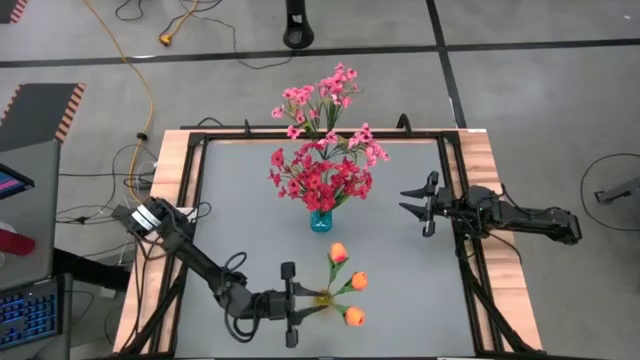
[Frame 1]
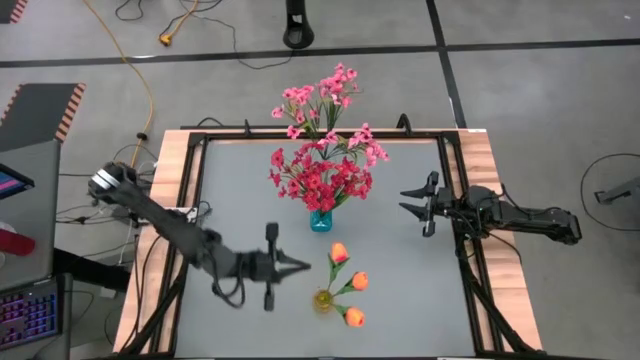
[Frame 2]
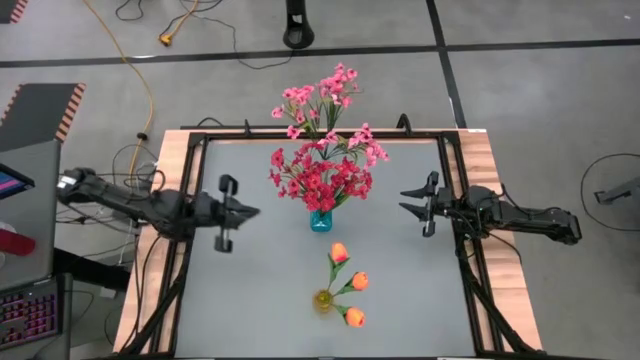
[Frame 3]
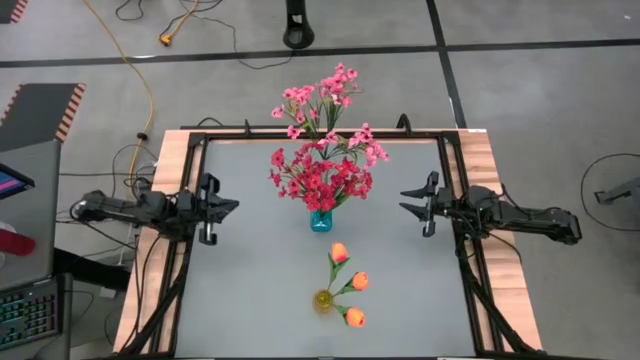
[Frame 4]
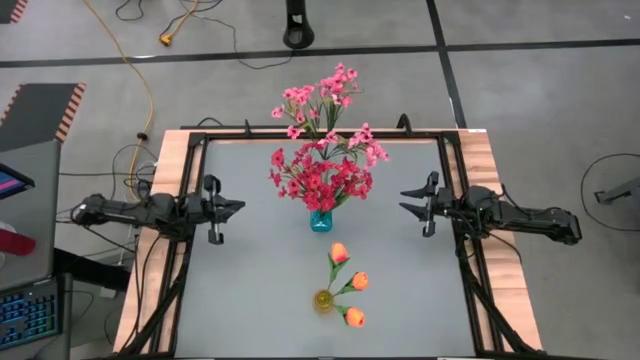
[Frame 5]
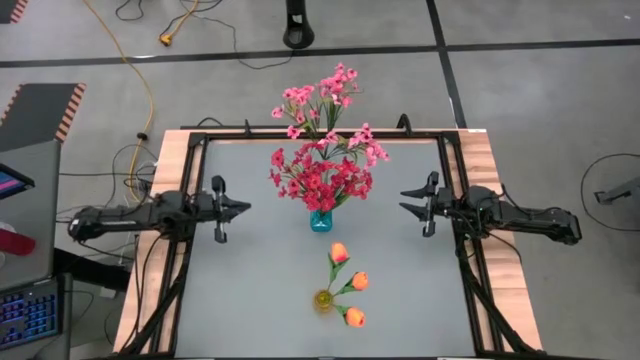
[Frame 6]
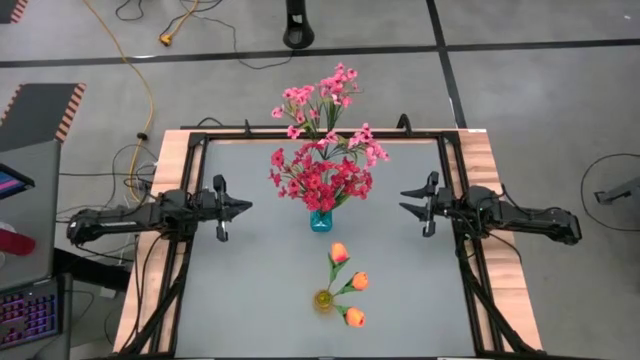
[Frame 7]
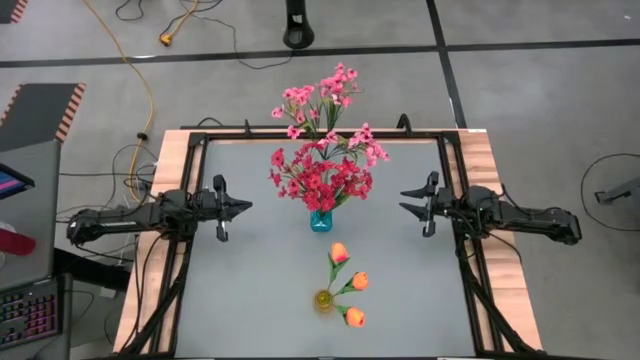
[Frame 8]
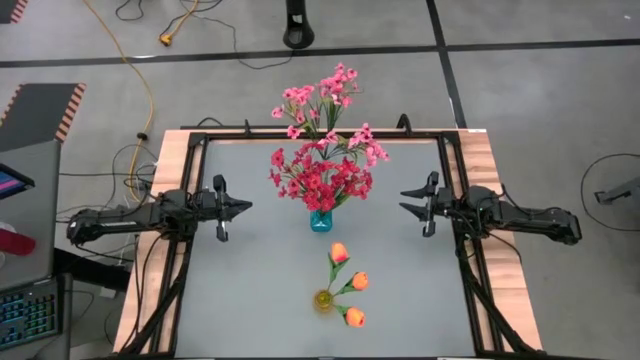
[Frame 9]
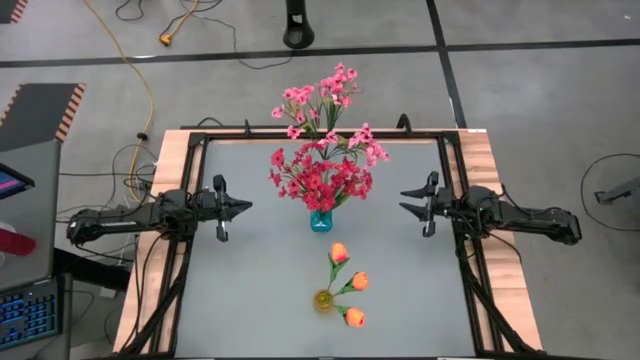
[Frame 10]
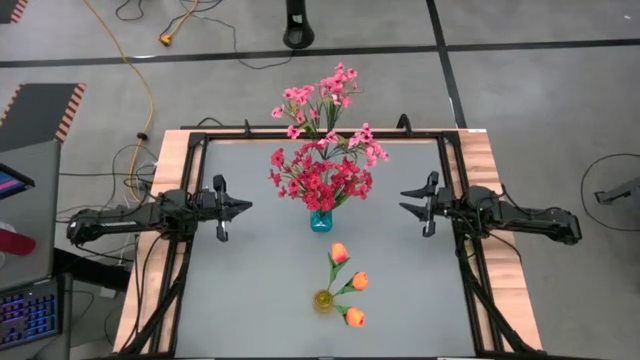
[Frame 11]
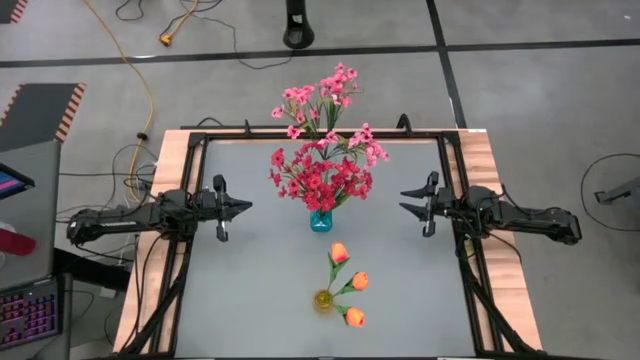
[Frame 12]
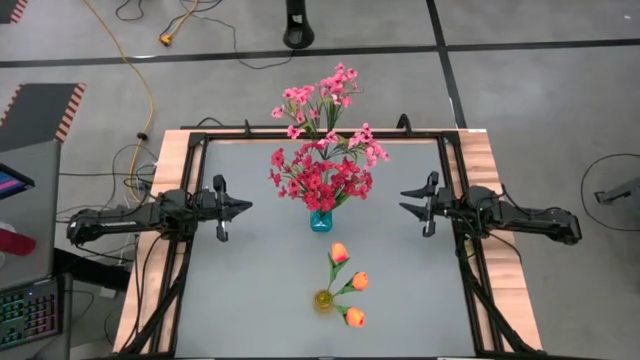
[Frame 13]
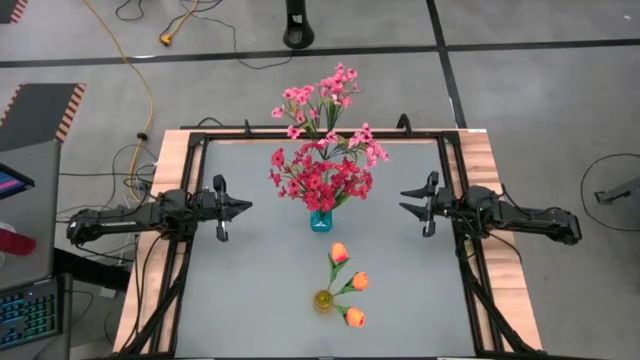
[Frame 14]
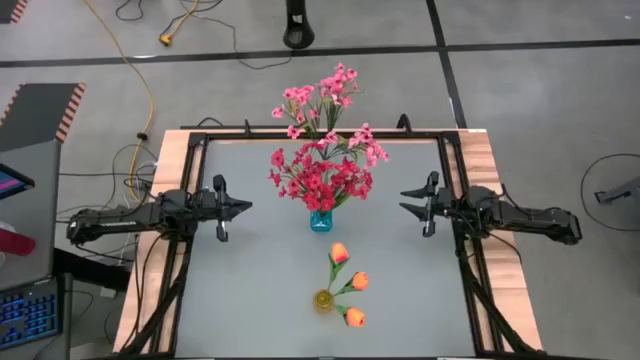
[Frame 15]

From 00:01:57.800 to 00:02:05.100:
Task: Sort flowers into vase by color
Return to Home Position

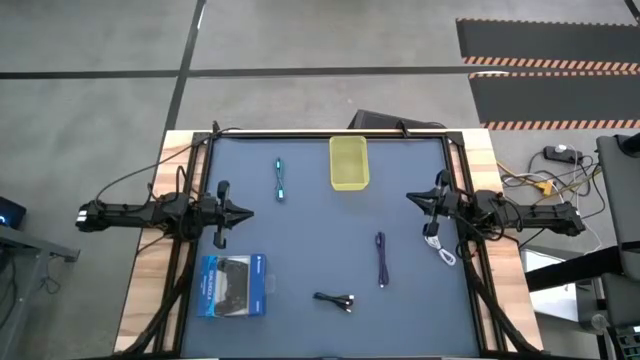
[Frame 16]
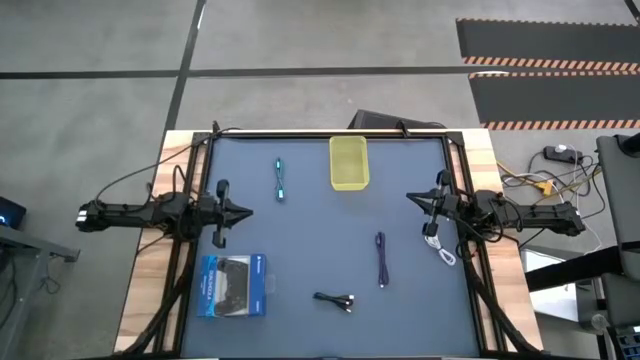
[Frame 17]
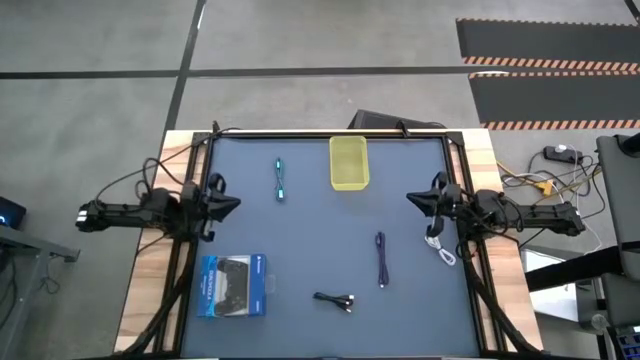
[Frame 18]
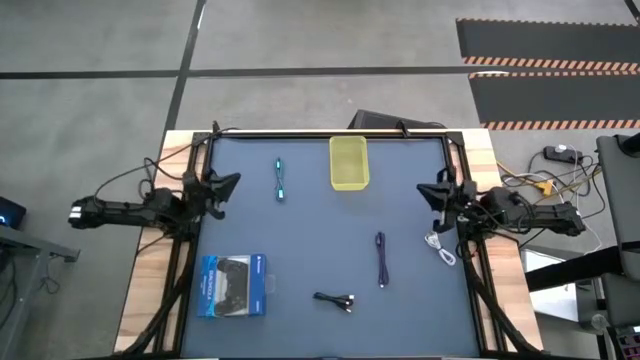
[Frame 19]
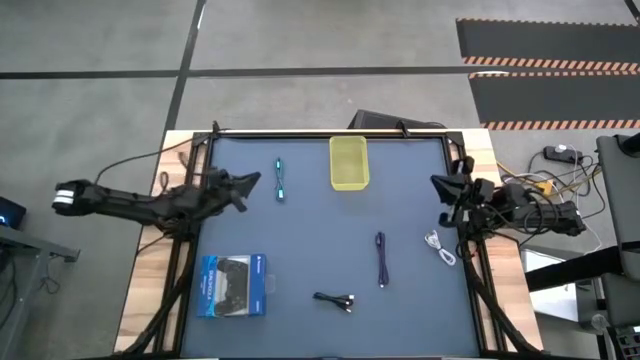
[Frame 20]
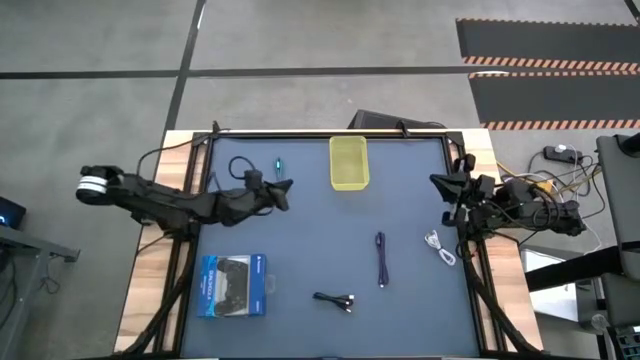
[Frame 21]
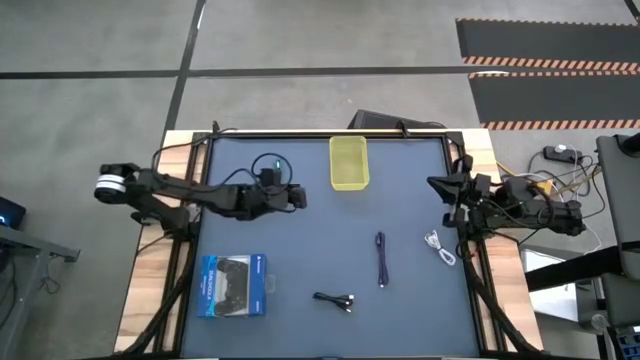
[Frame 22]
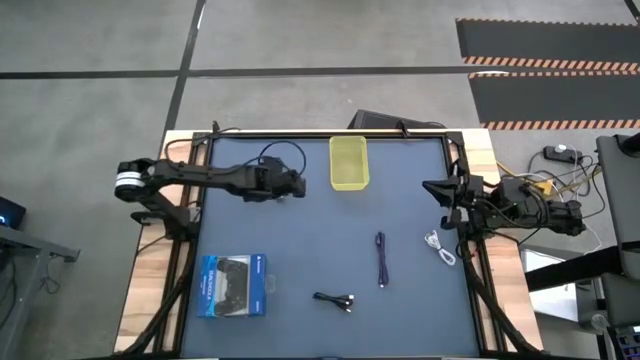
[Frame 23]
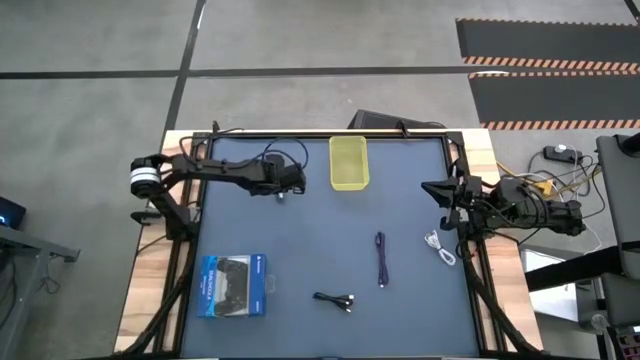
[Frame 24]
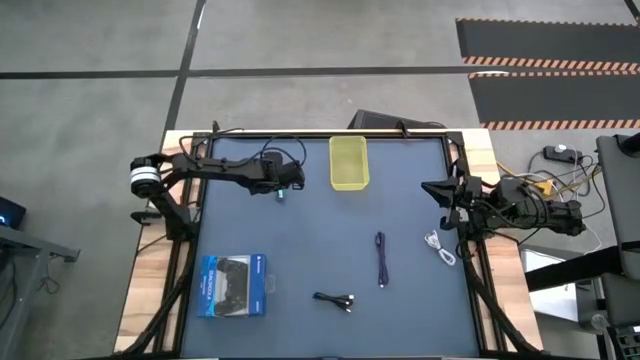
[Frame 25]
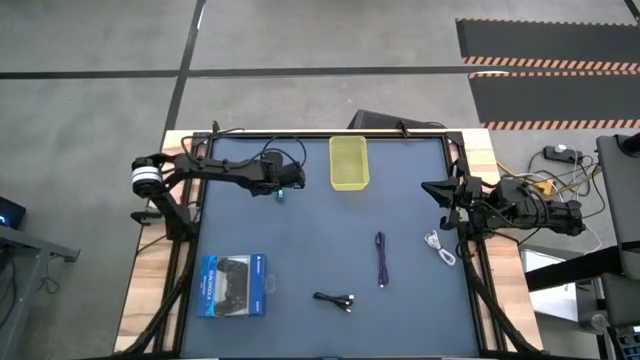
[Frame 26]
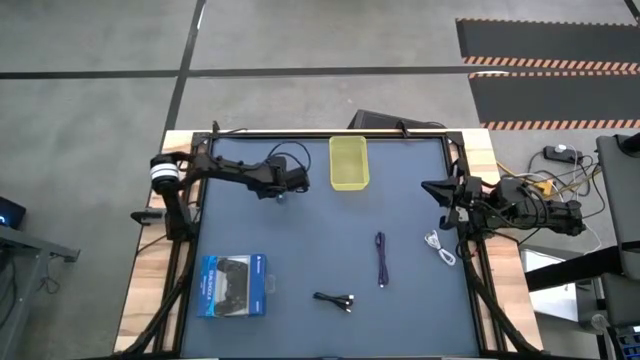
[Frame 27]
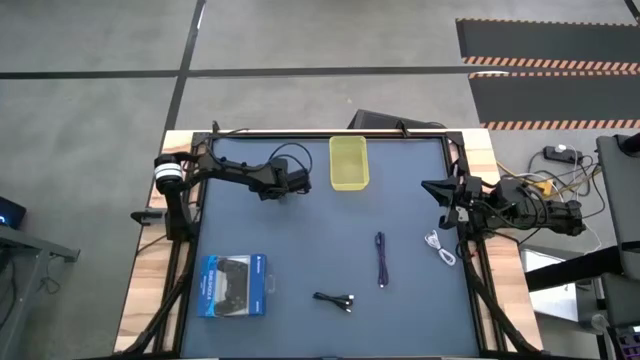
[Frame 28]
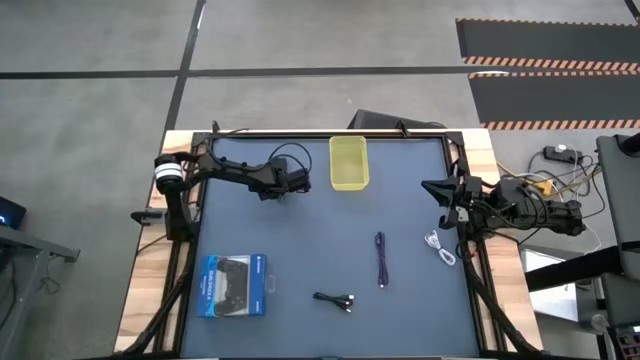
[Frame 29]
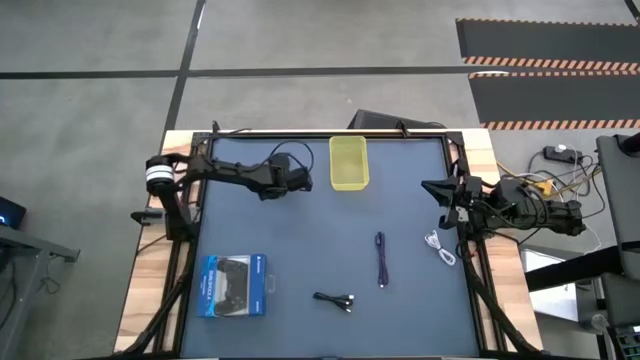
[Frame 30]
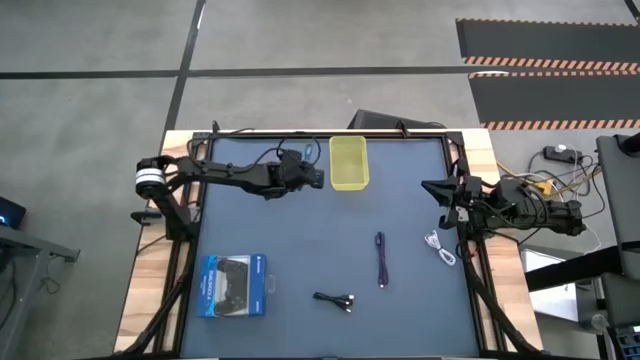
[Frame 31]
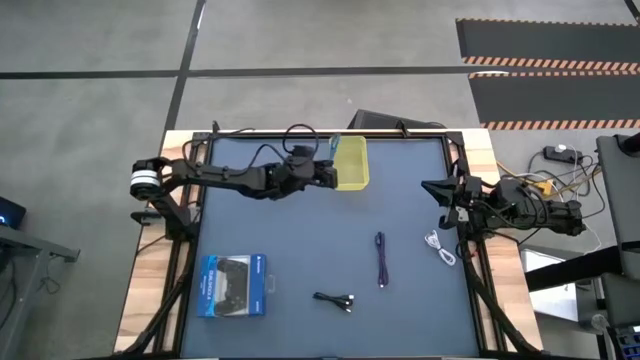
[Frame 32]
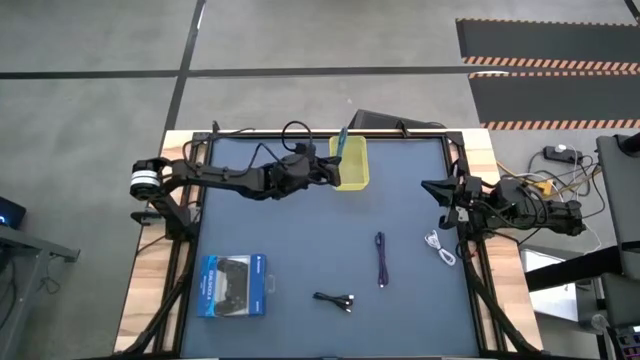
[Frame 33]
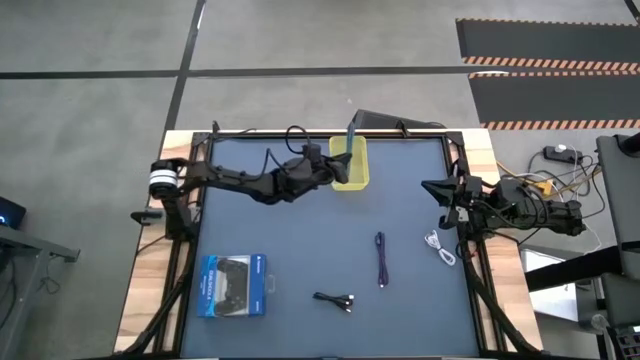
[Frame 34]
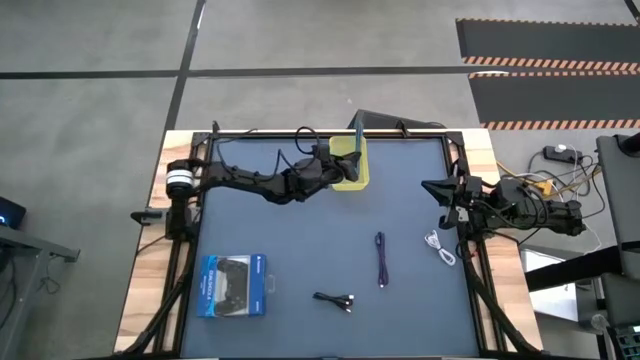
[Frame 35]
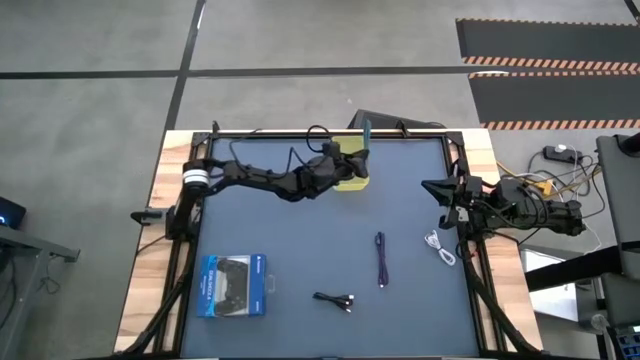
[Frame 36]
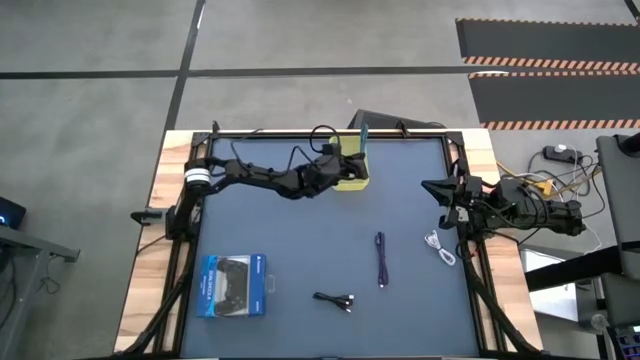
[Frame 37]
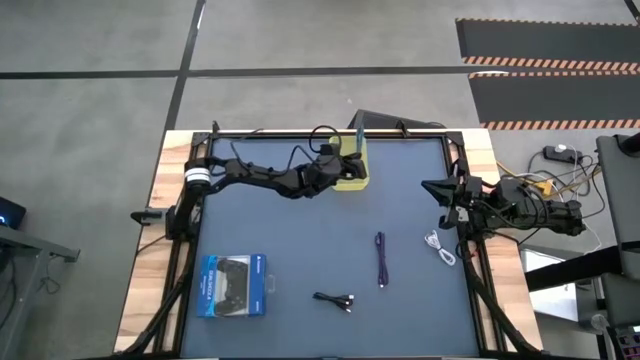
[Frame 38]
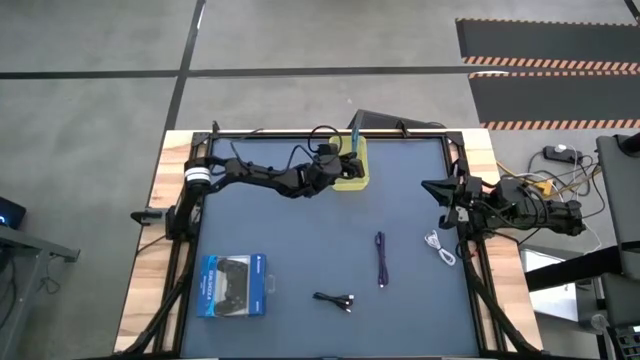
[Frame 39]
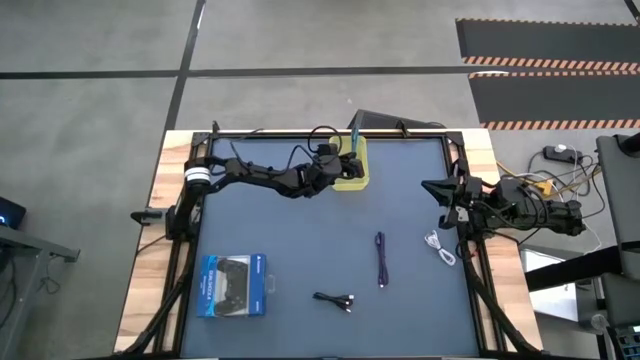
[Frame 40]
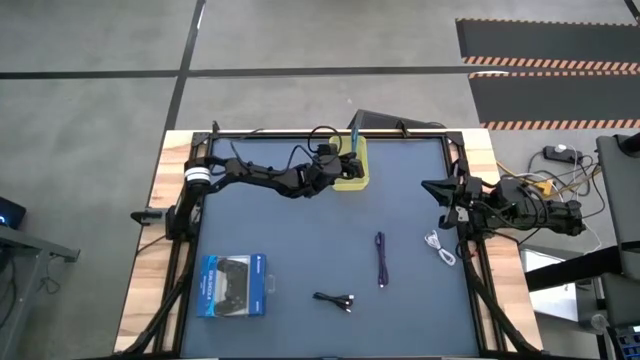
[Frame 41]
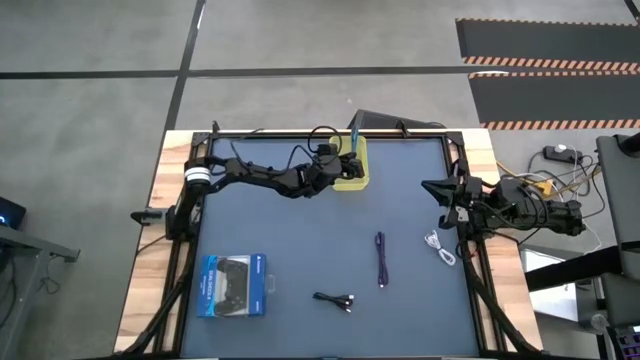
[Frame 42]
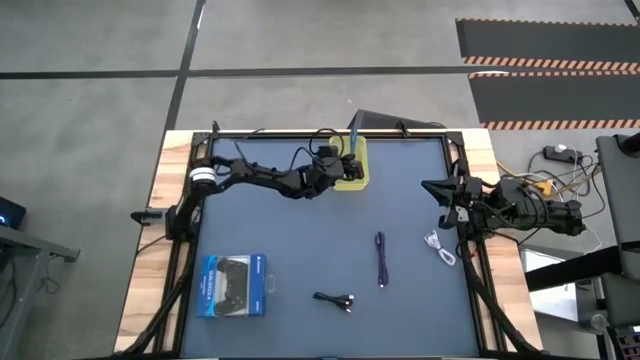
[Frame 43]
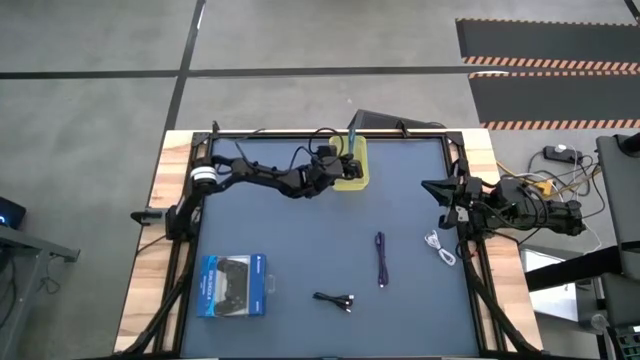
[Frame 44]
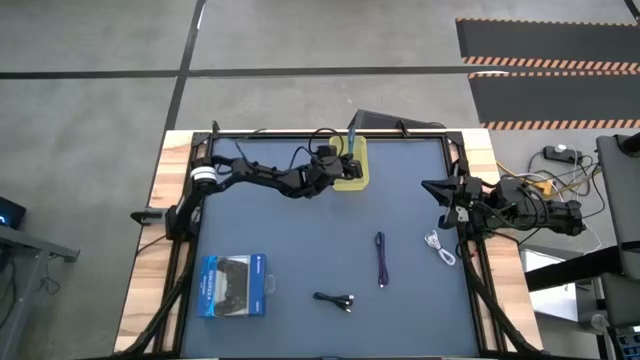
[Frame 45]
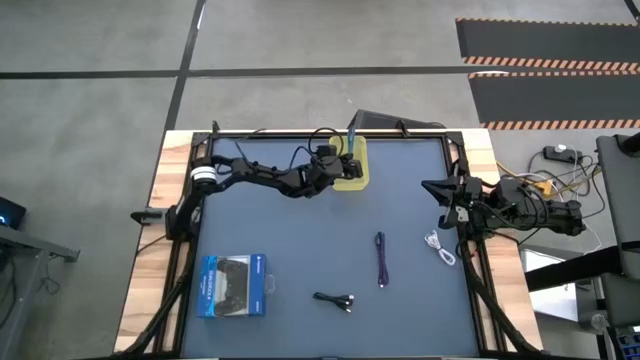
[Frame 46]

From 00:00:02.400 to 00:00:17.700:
Task: Pick and place USB-C Cables
Put the blue charger cable into the yellow bin
